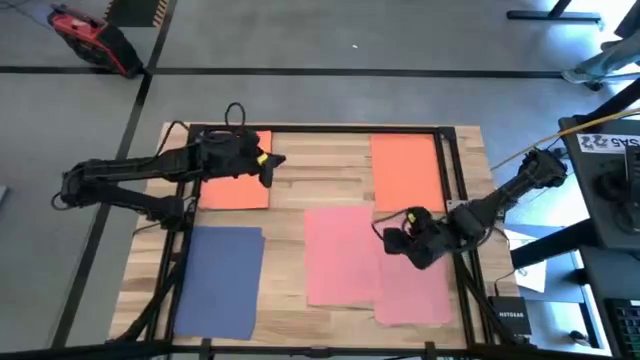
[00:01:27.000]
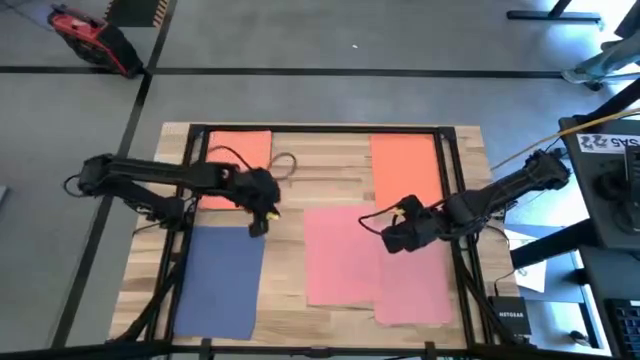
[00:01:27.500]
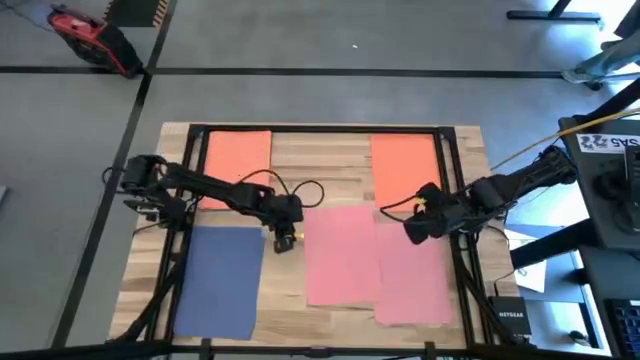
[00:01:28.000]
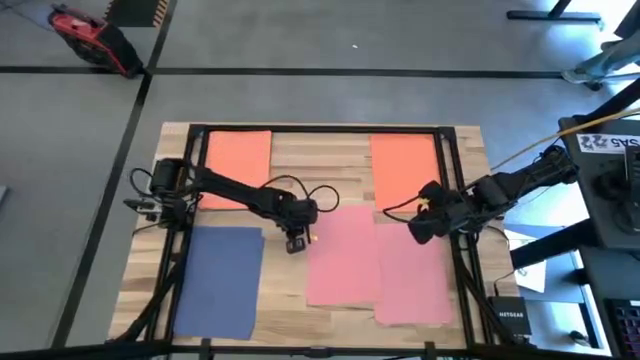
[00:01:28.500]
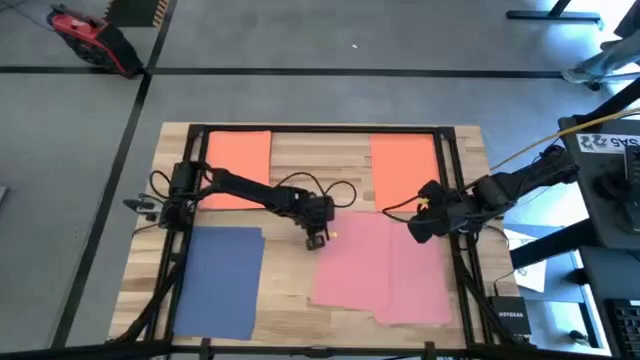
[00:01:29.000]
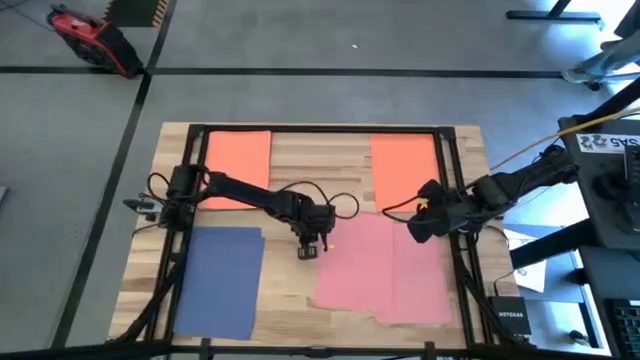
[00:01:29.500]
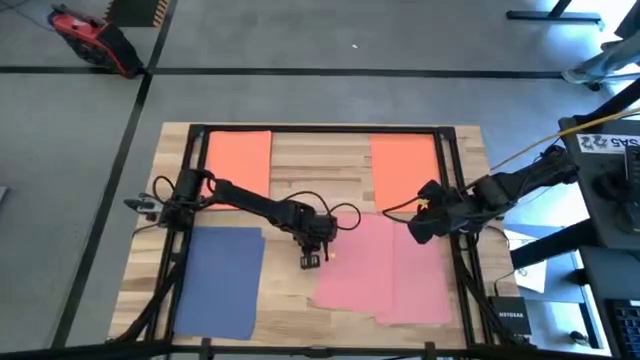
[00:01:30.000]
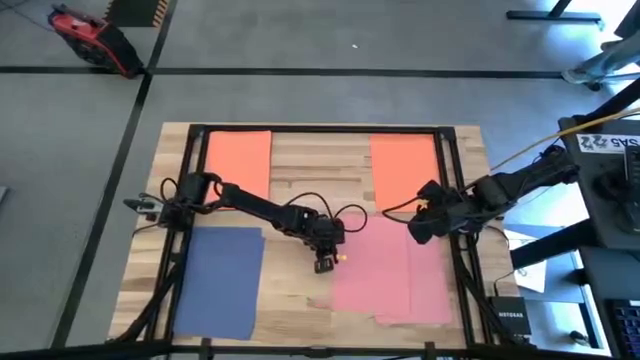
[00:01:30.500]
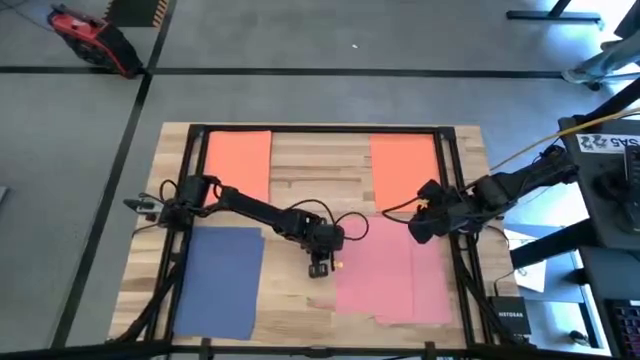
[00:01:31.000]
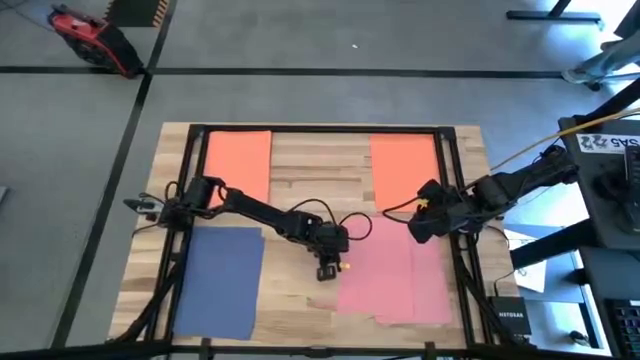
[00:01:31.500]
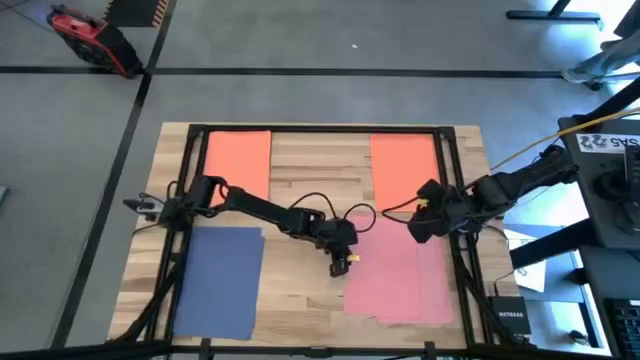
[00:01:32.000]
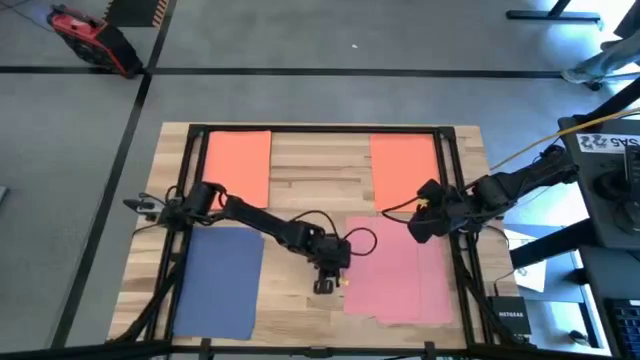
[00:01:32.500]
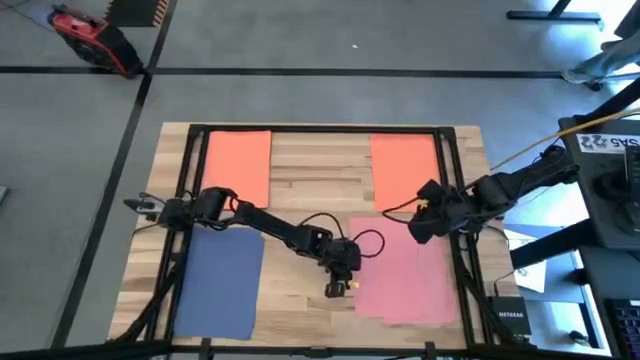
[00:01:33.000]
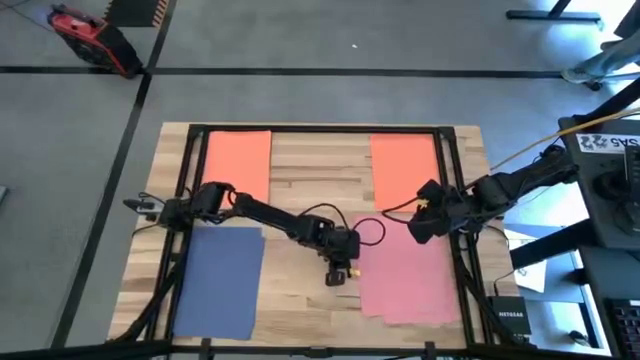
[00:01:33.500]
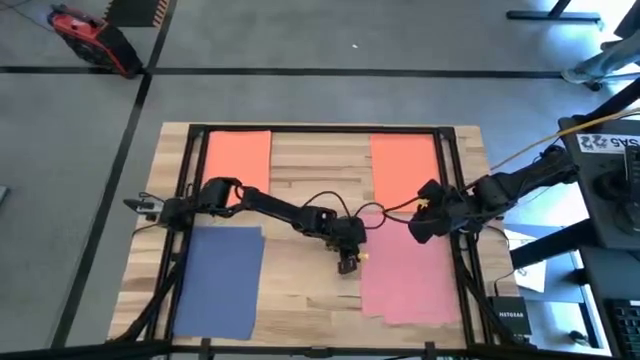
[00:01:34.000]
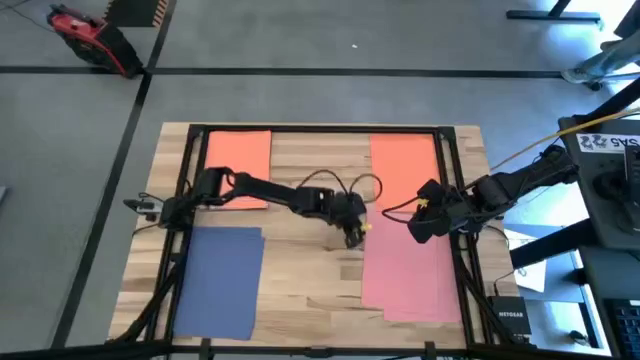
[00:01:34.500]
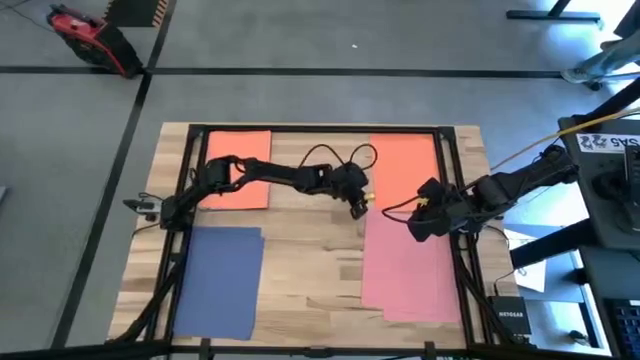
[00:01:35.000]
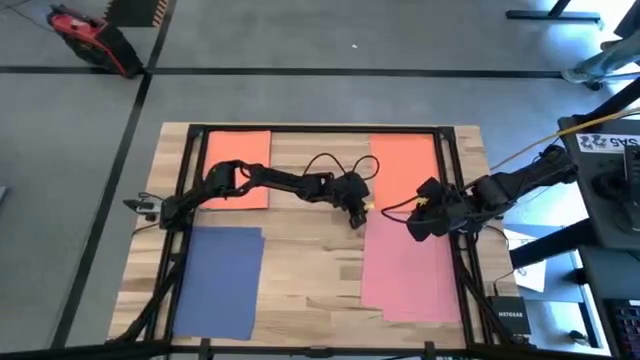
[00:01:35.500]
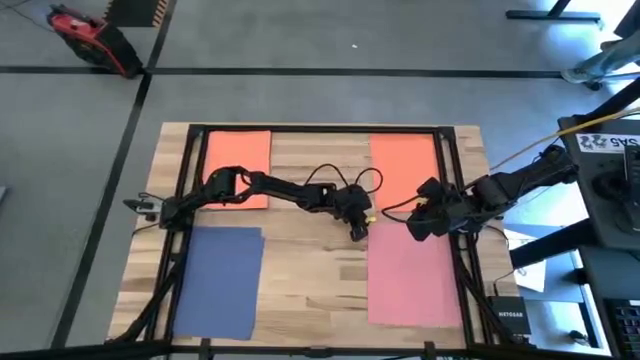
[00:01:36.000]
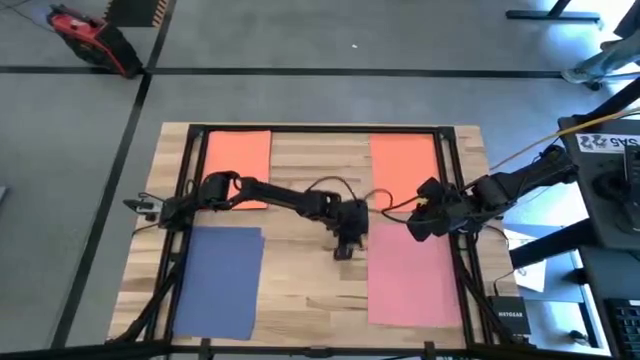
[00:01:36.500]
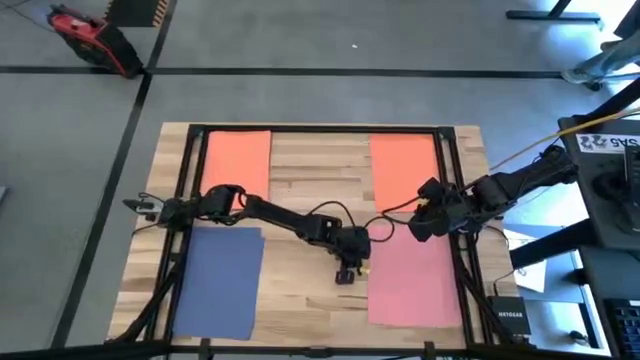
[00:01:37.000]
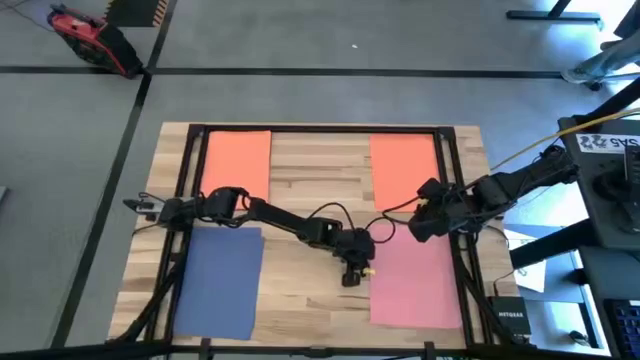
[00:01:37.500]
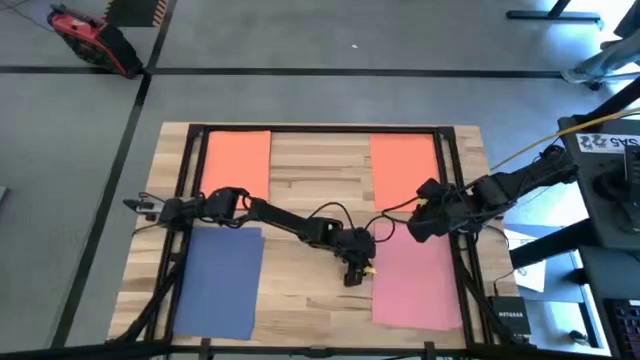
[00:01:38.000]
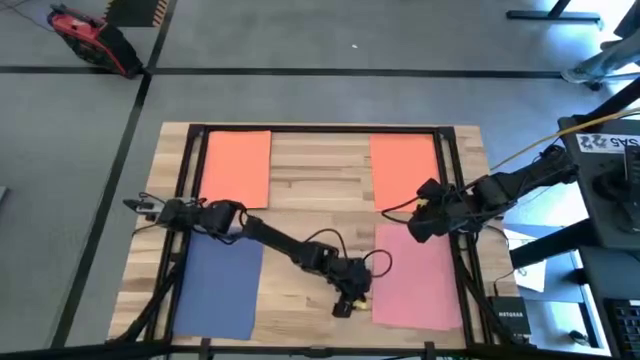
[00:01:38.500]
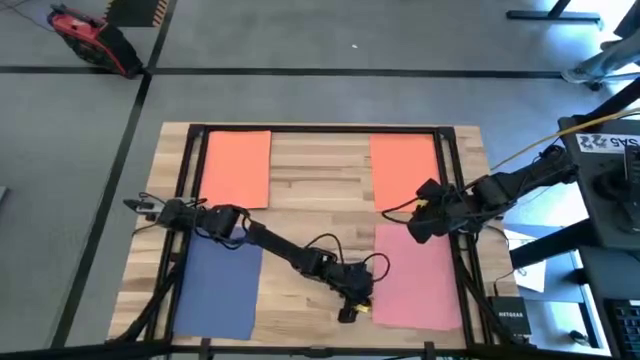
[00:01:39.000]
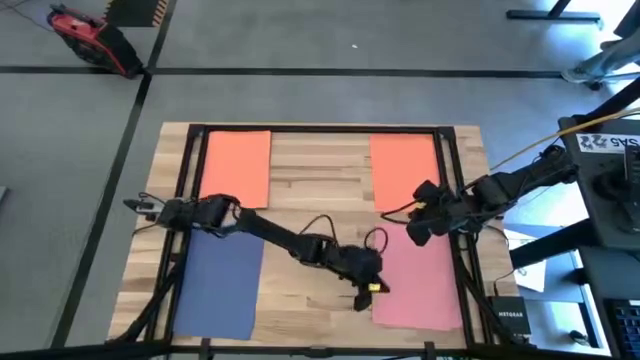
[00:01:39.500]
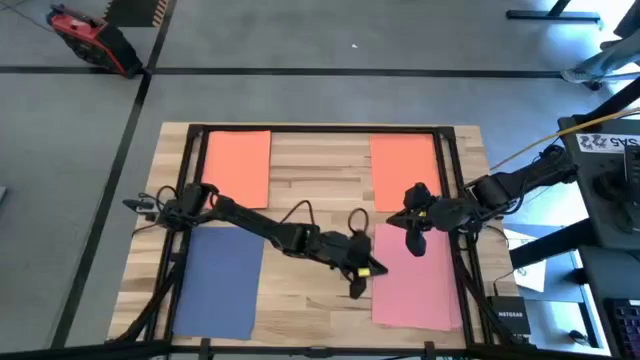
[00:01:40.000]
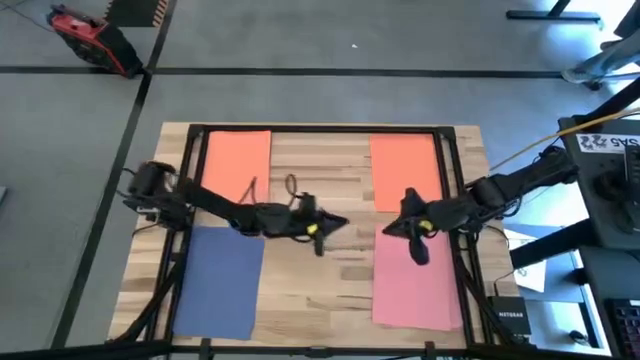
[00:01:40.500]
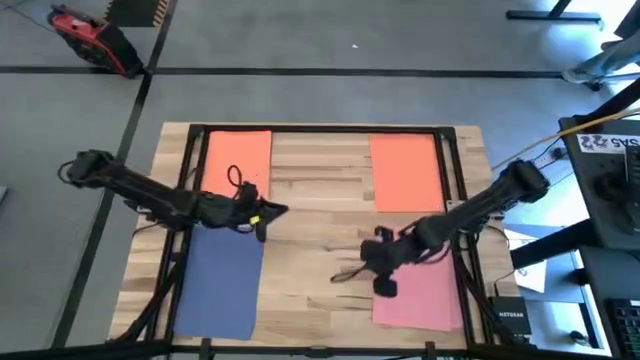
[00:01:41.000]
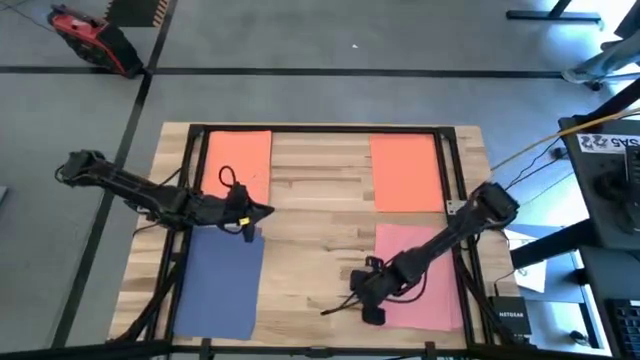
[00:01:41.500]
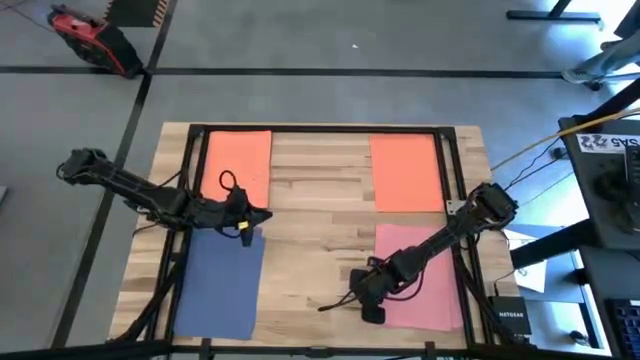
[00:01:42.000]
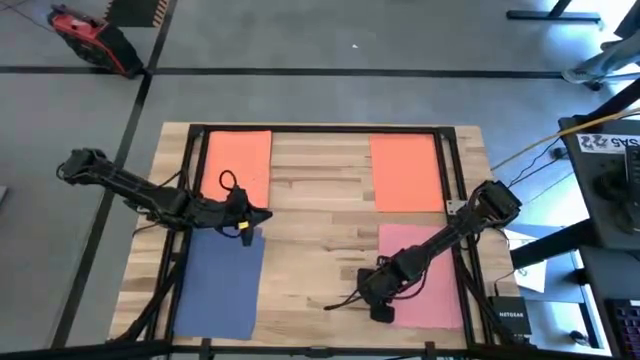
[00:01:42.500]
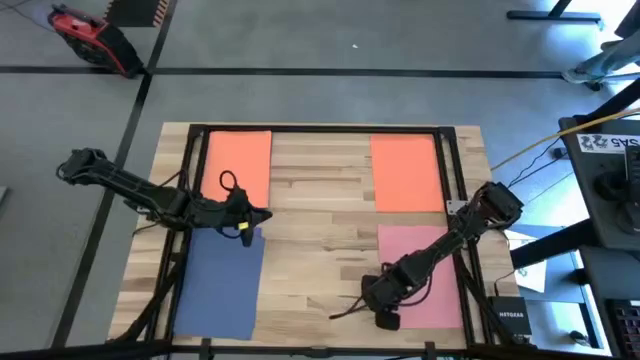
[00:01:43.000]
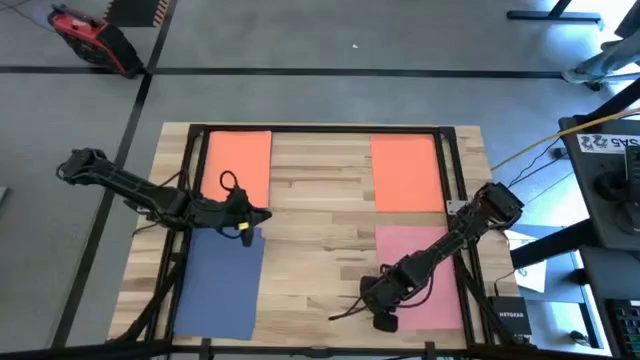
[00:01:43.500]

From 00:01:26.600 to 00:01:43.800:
Task: Organize paper
Stack the pink colored paper on top of the pink colored paper

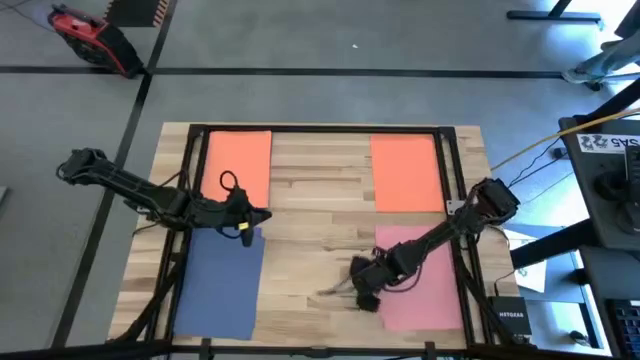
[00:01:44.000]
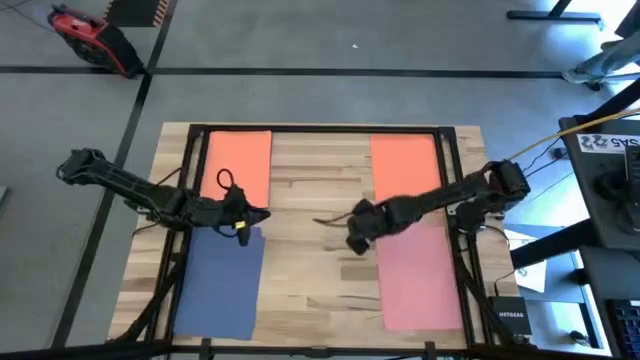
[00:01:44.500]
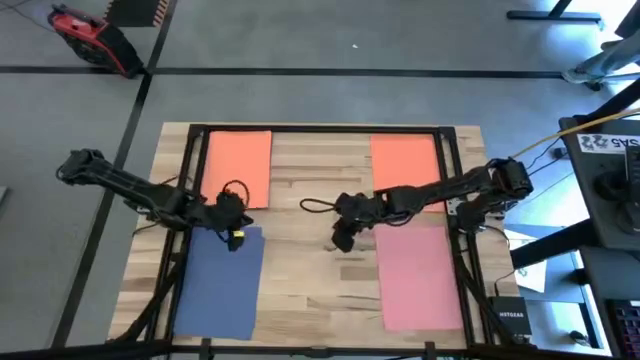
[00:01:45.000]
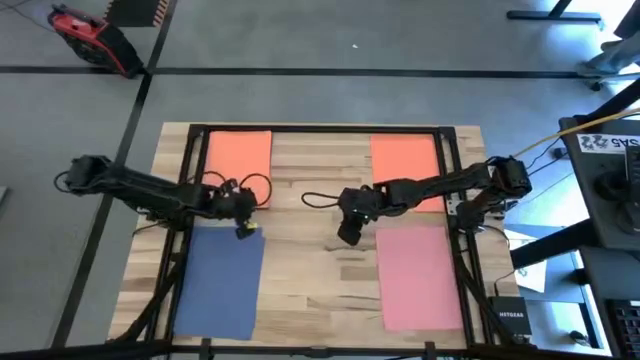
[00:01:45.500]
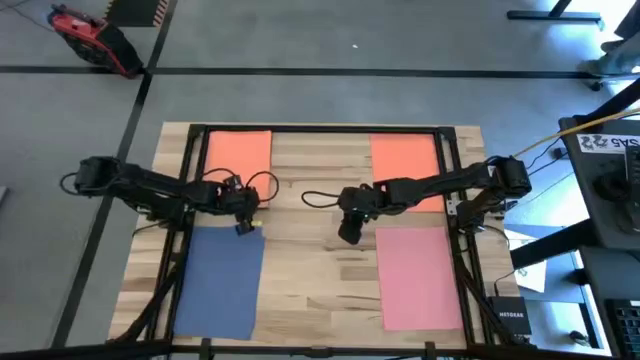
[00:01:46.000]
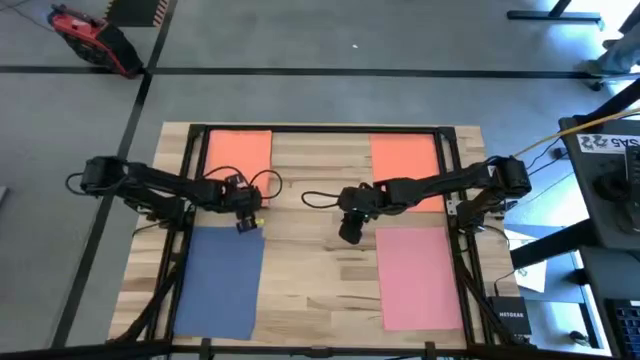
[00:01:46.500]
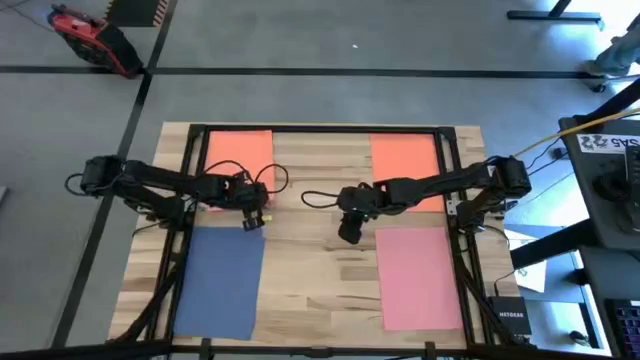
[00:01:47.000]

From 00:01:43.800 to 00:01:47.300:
Stack the orange colored paper on top of the orange colored papers

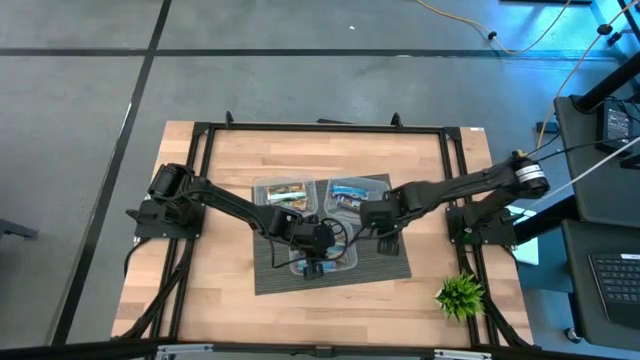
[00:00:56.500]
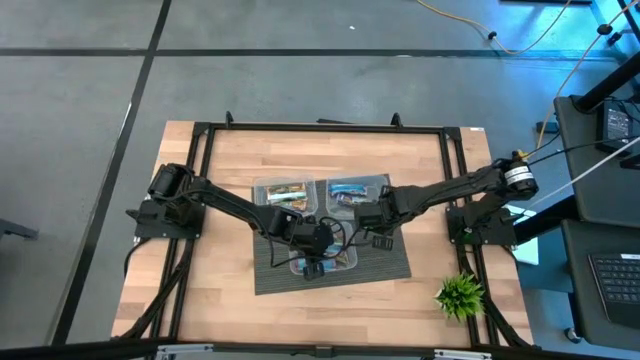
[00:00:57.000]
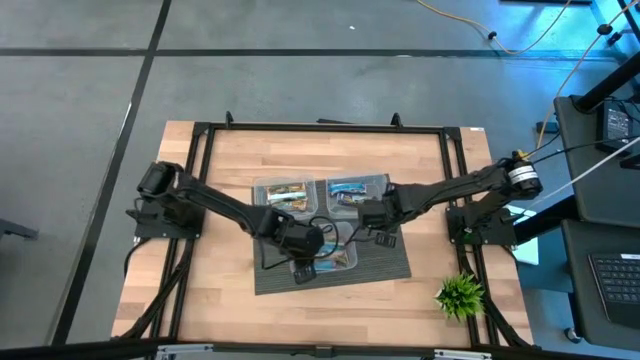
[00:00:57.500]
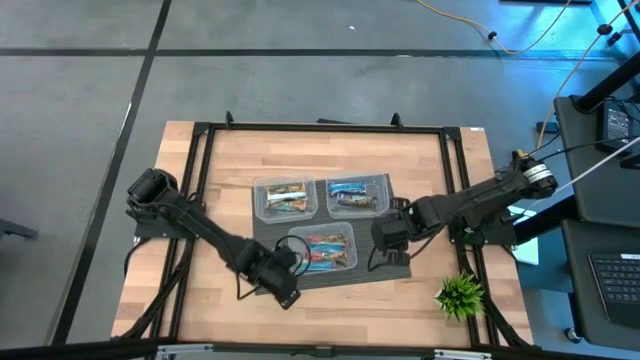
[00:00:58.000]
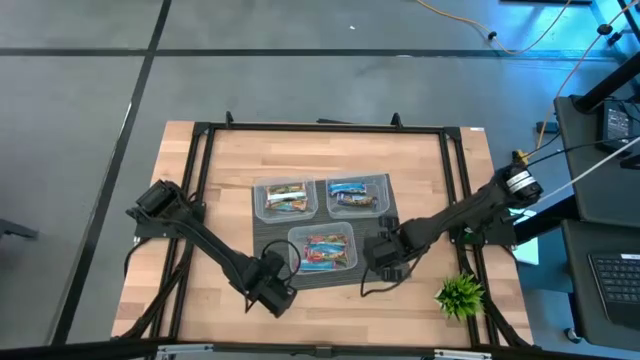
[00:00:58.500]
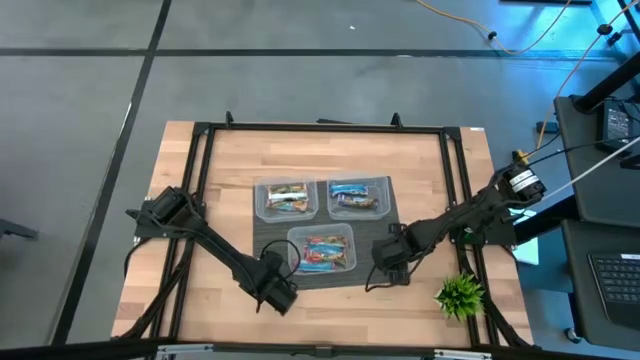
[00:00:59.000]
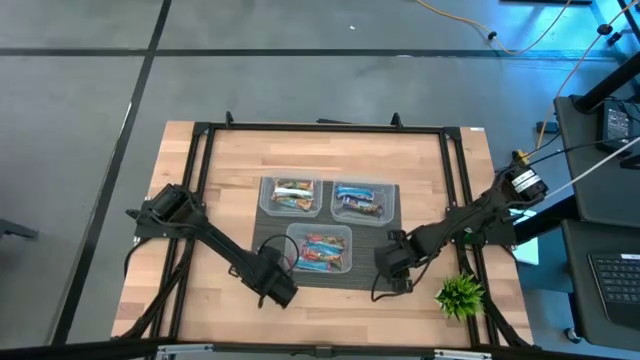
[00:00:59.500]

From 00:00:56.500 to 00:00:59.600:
Task: Pick and place Granola Bars by type
Adjust the placemat slightly
